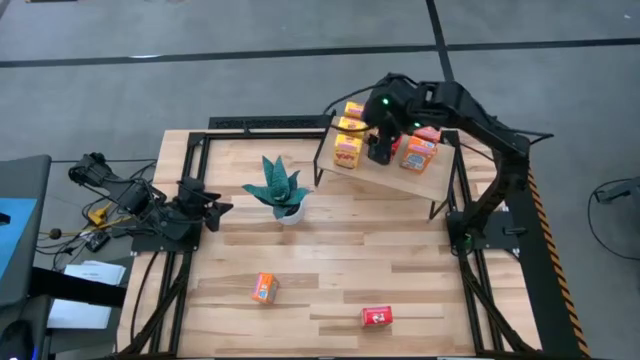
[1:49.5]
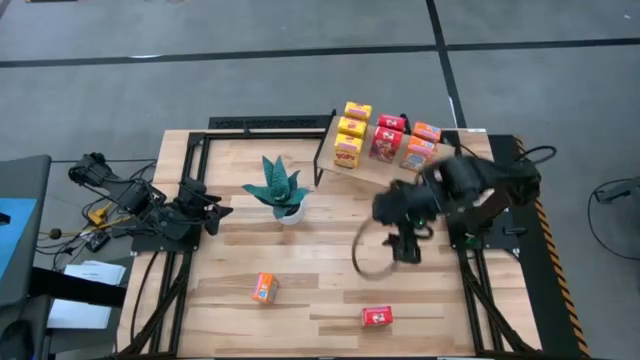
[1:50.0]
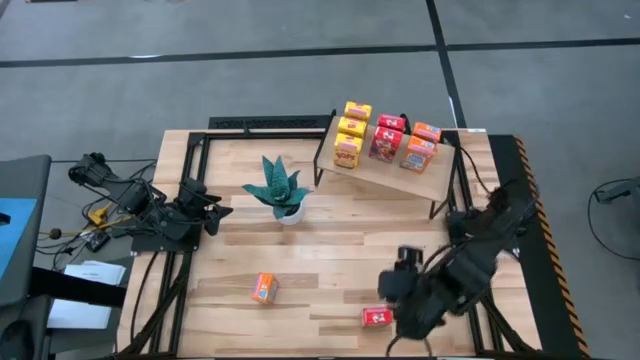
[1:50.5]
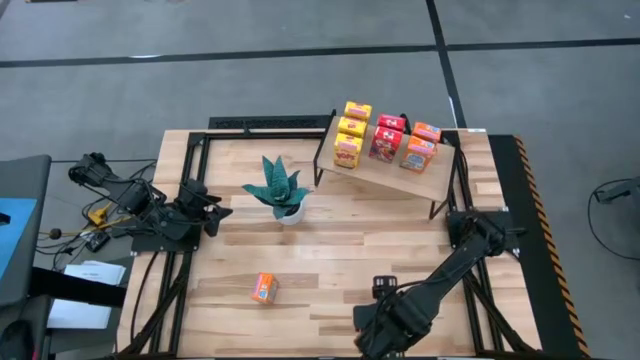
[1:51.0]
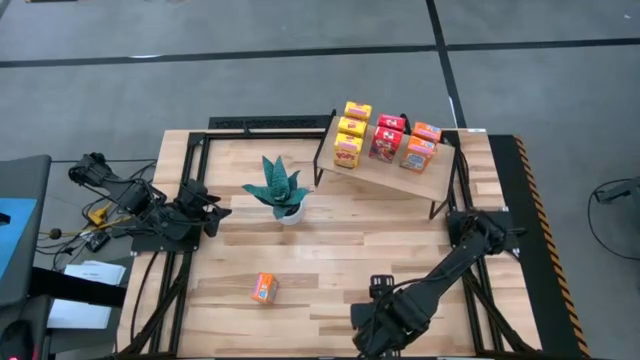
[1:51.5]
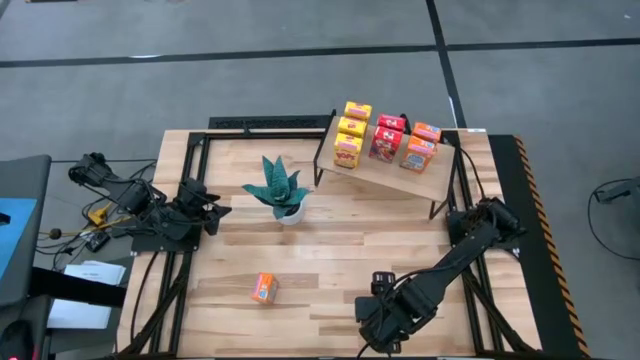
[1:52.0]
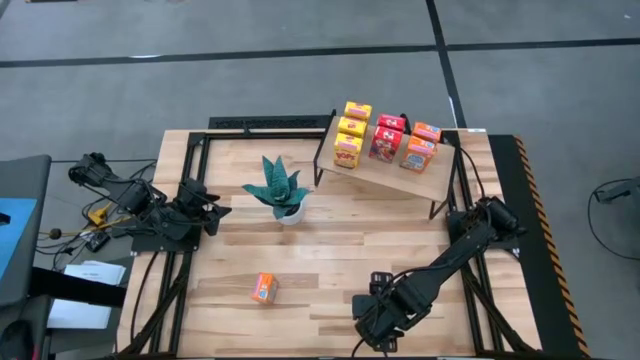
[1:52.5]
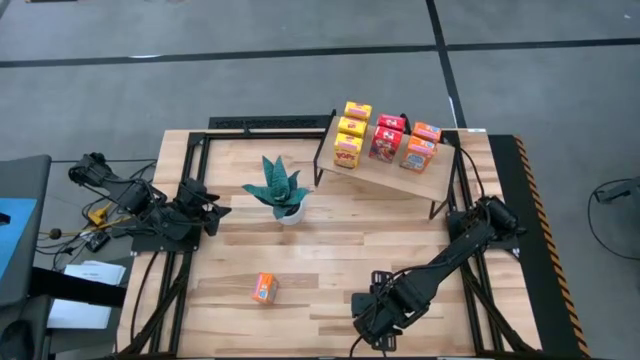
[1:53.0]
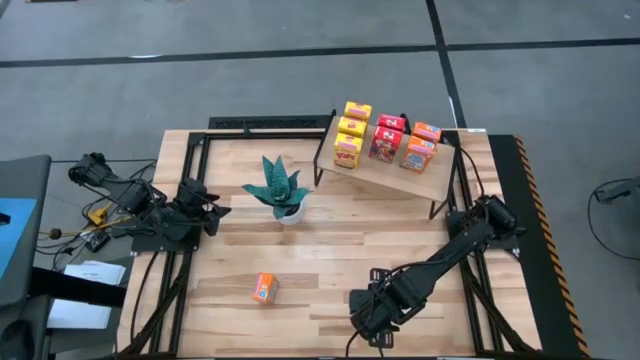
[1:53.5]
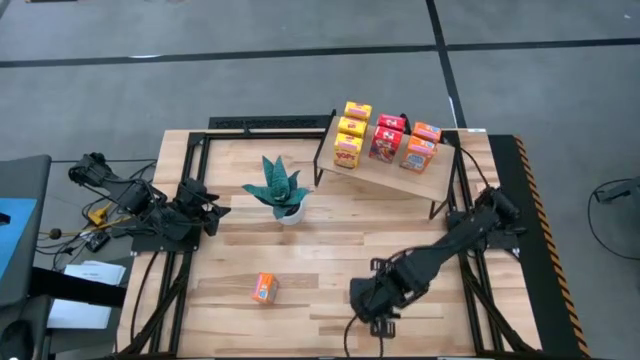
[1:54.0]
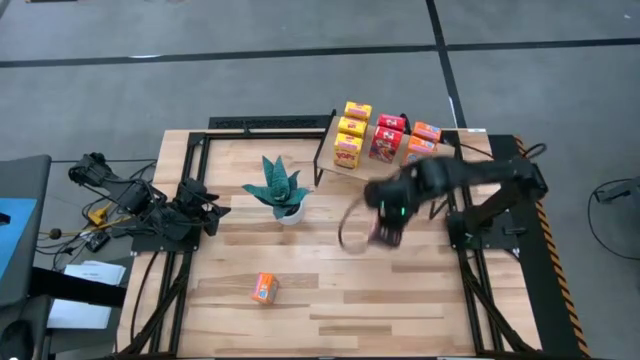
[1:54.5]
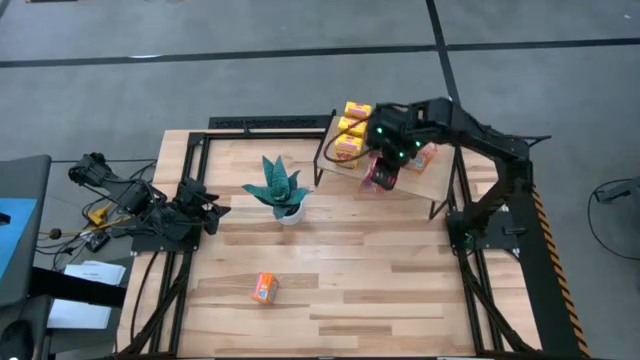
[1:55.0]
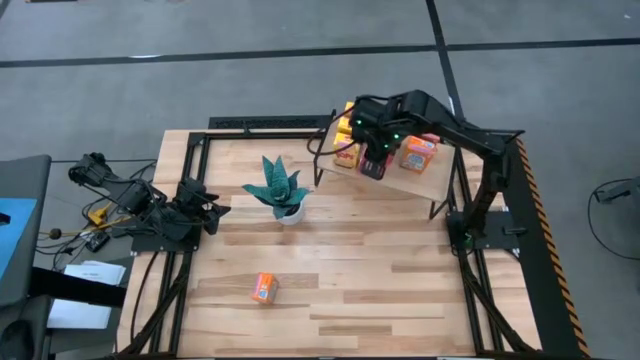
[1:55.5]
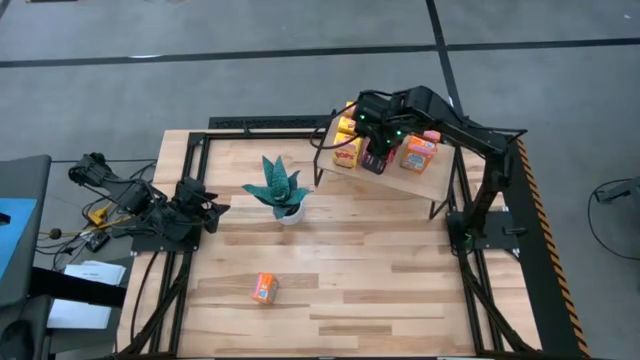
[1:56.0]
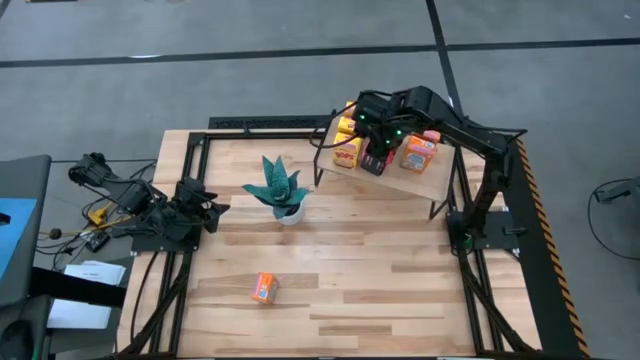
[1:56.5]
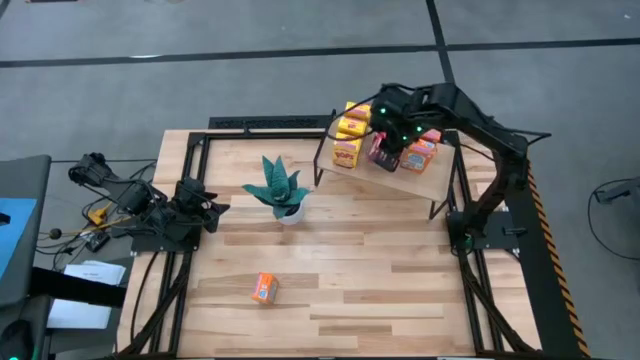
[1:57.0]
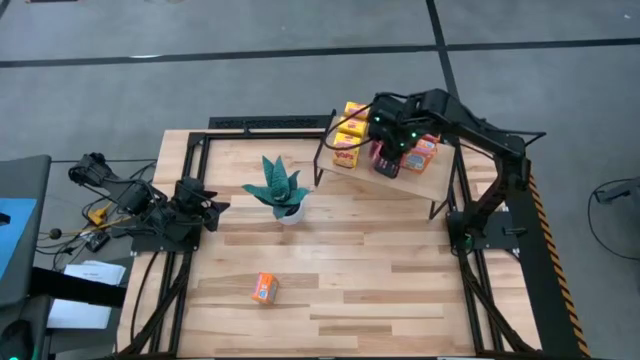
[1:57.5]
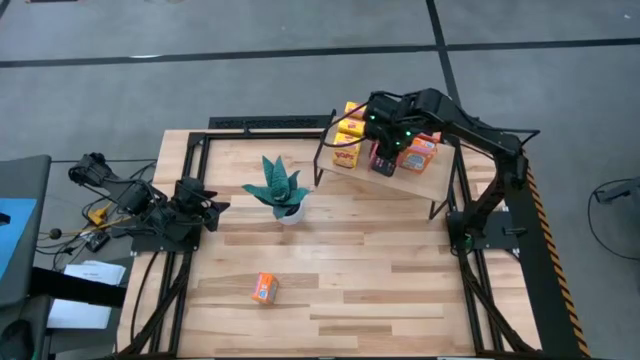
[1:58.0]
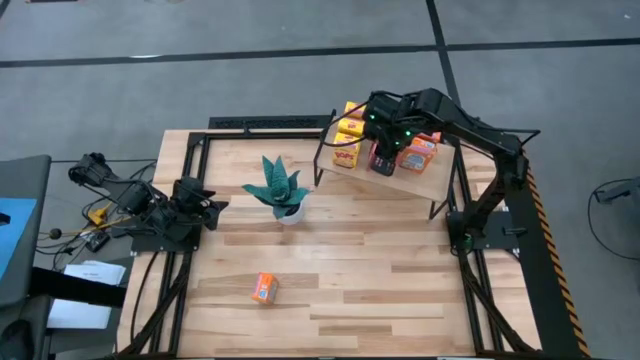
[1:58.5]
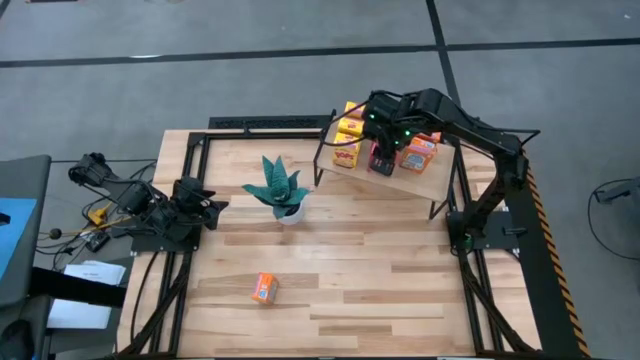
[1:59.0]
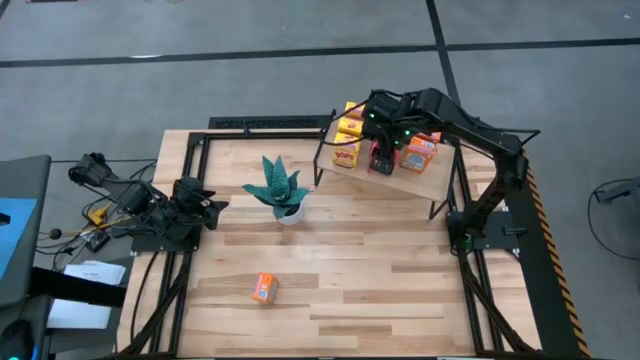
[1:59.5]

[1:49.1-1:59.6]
Task: Stack cereal on shelf
Put the red cereal box on the shelf aligned with the other red cereal boxes

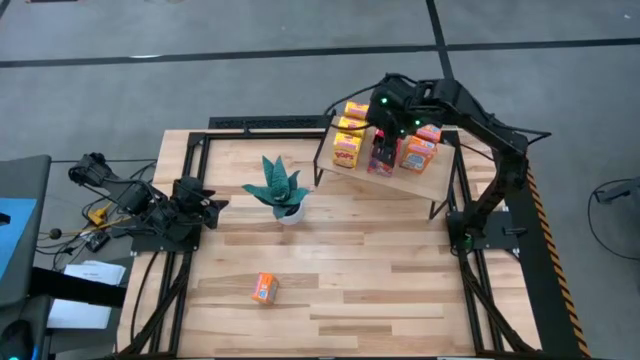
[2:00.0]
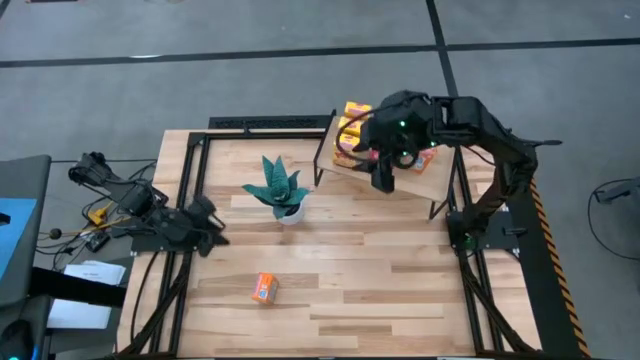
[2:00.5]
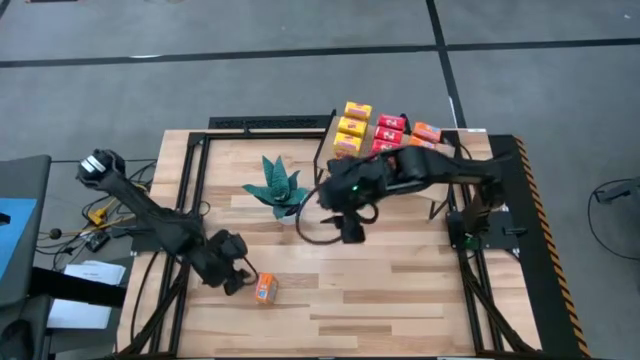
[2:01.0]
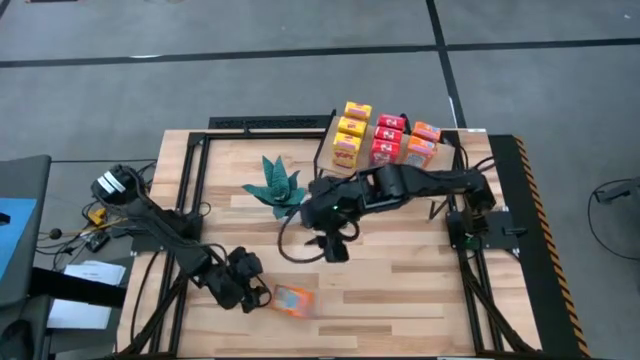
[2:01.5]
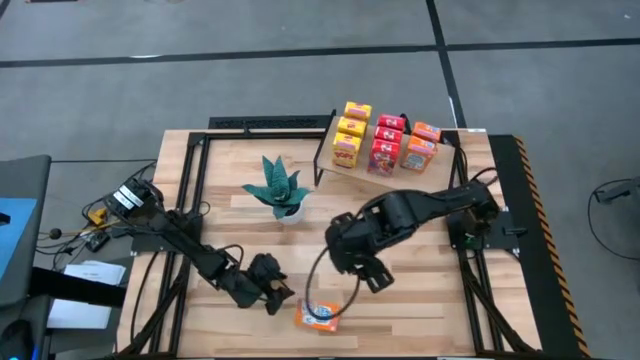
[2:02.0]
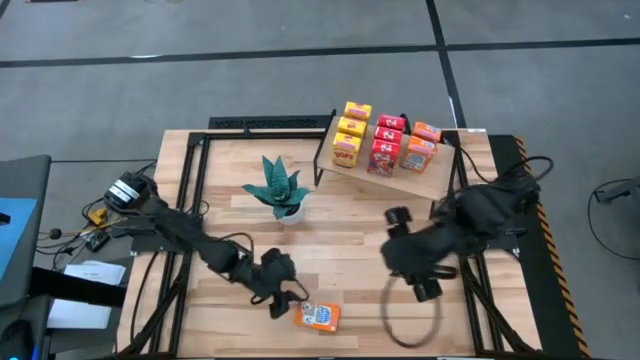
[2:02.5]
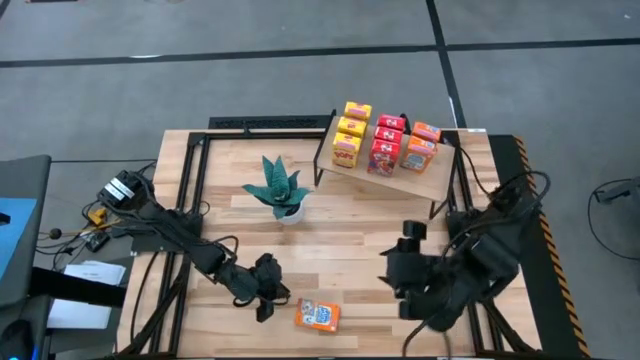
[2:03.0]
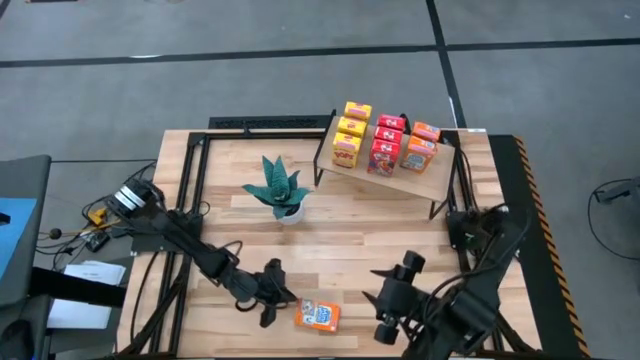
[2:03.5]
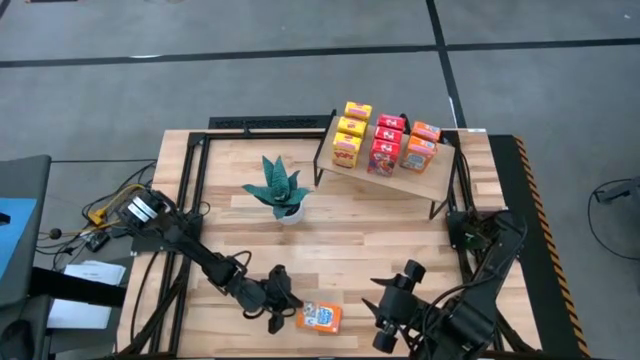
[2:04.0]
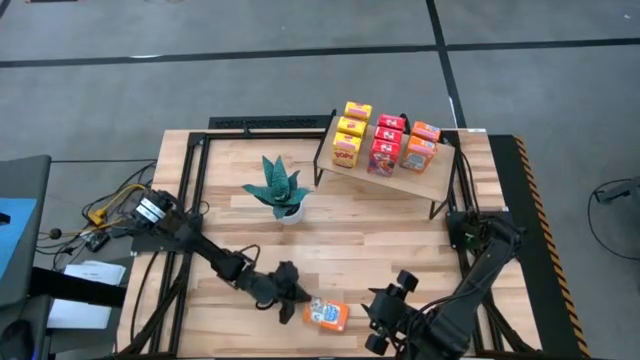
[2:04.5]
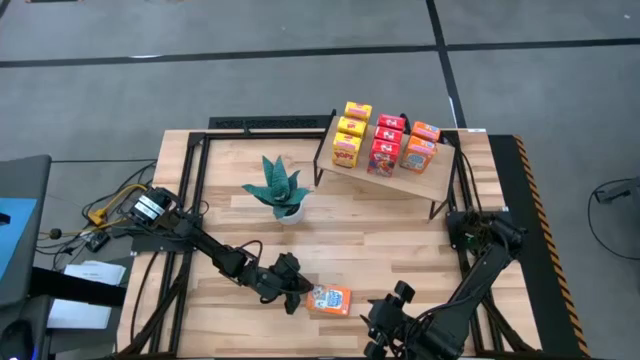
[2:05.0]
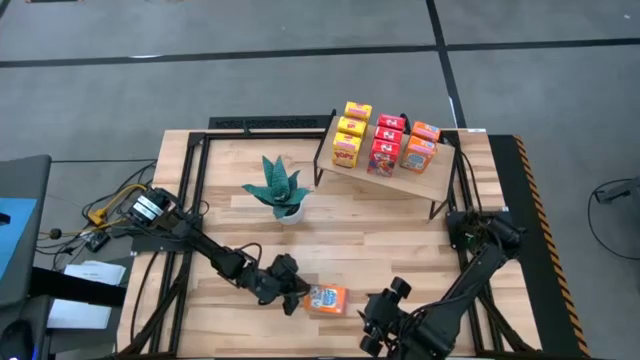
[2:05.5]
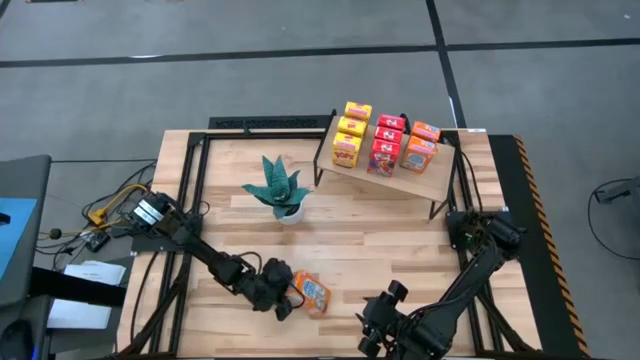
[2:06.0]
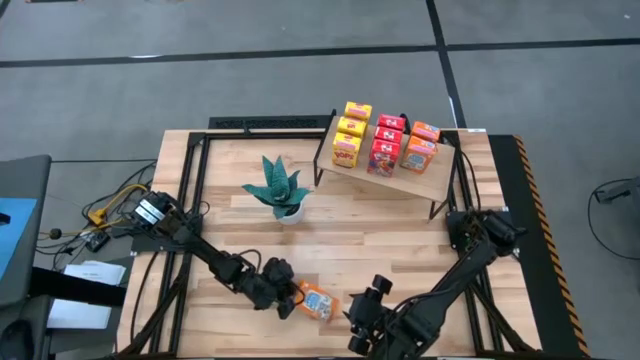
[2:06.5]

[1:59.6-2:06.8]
Put the orange cereal box on the shelf aligned with the other orange cereal boxes

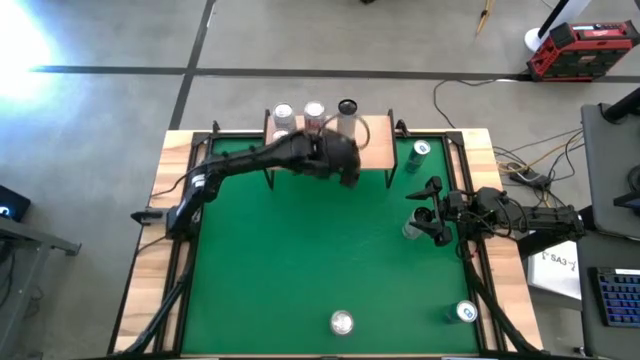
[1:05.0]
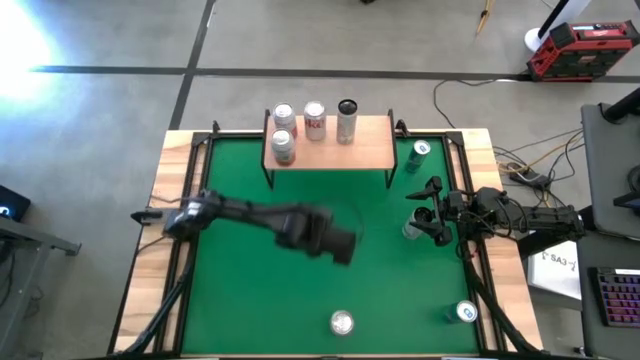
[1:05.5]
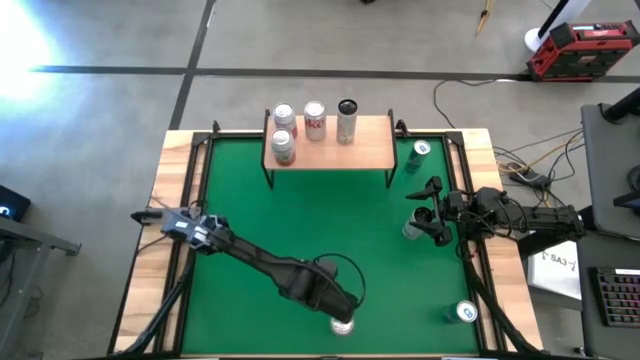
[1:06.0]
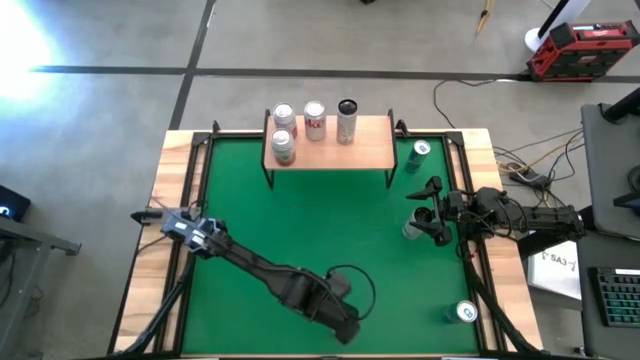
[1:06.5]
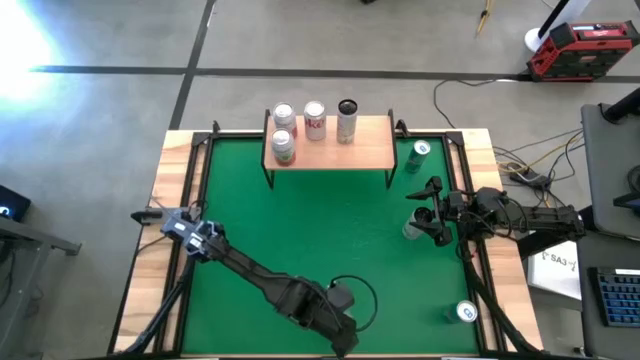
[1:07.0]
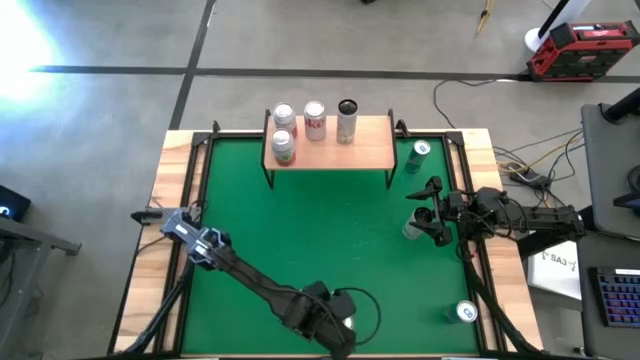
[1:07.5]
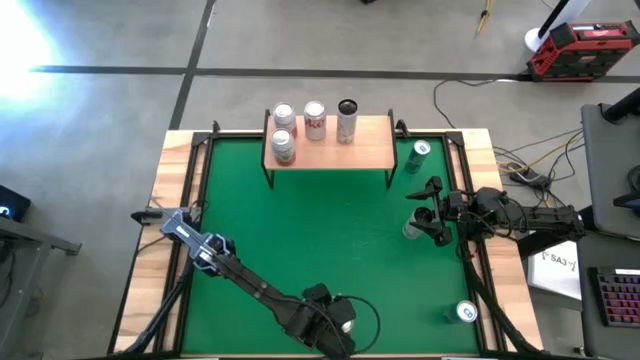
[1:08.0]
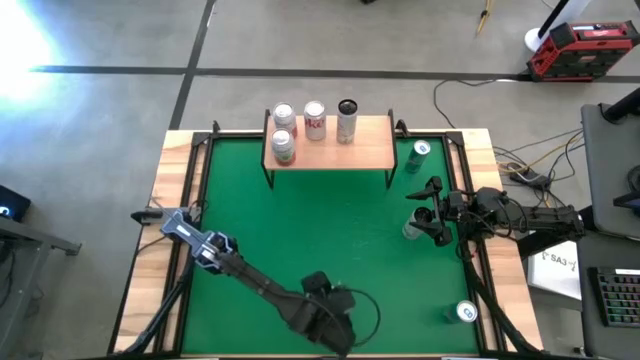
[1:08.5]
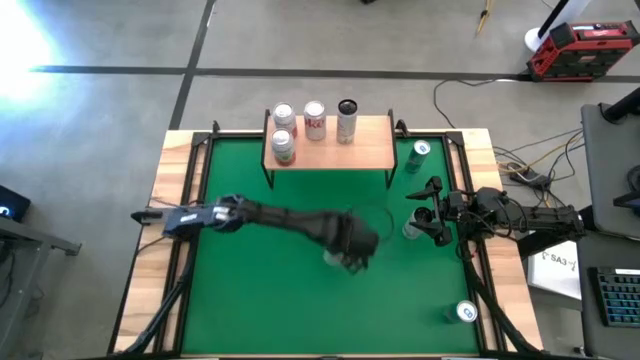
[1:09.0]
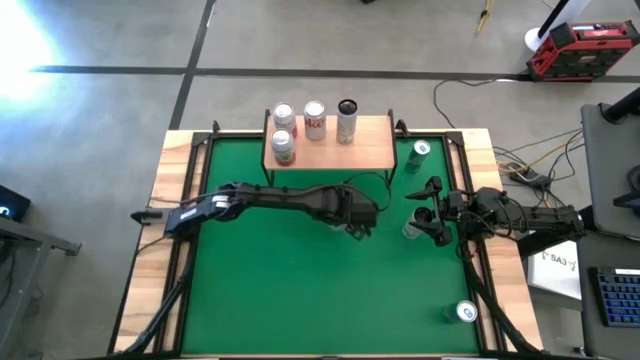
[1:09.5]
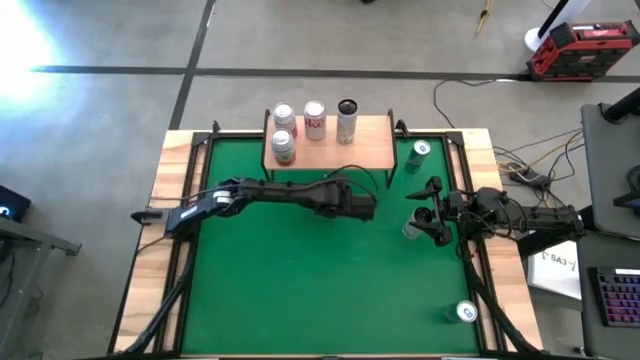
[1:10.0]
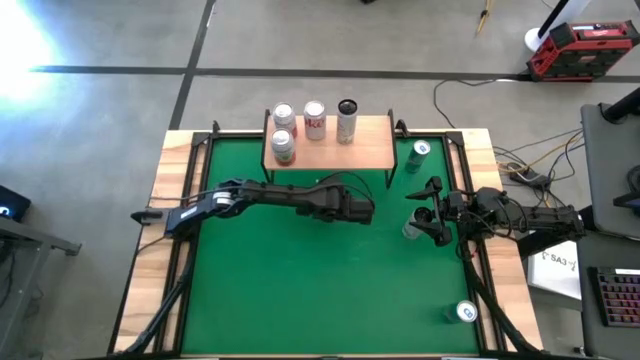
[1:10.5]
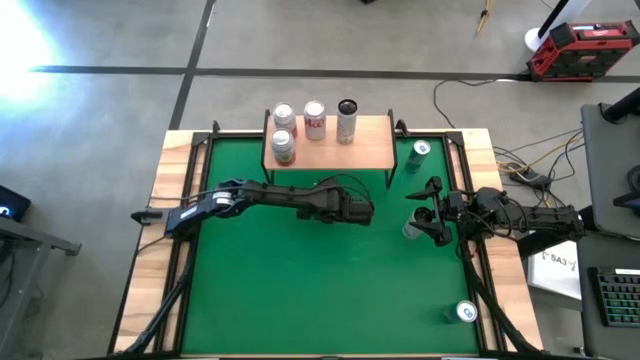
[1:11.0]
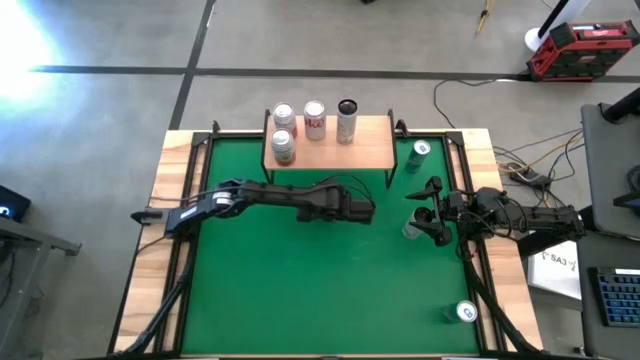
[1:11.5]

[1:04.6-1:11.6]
Task: Place canned beverage on shelf
Move the red-silver soda can to the center of the table
